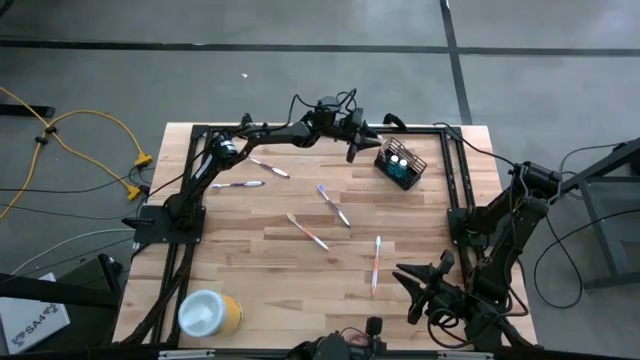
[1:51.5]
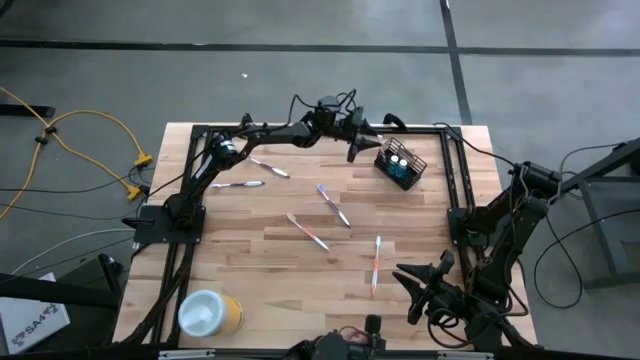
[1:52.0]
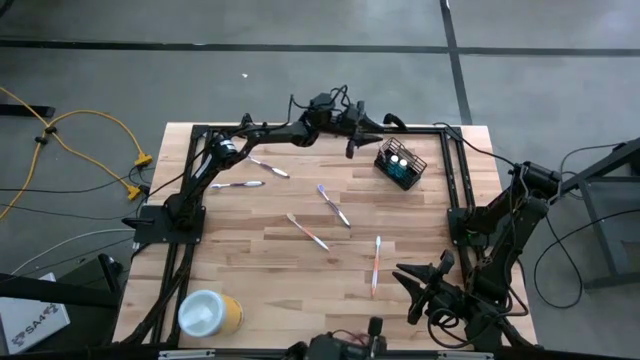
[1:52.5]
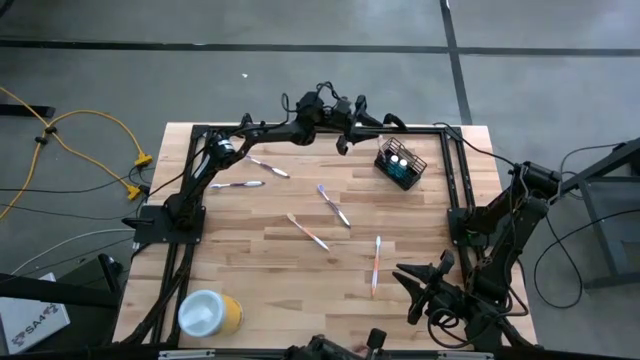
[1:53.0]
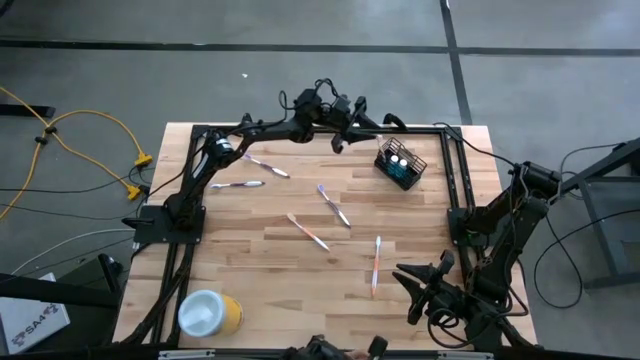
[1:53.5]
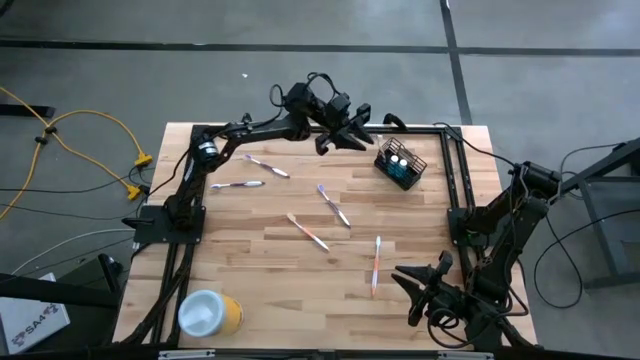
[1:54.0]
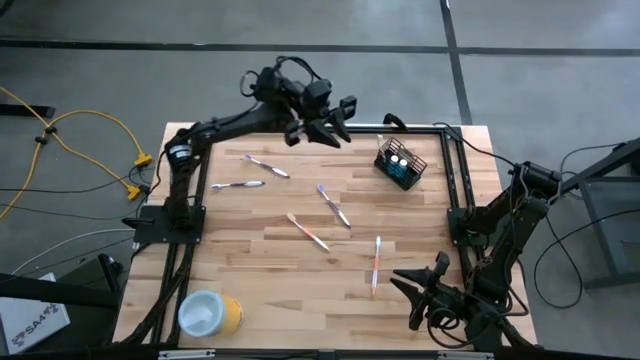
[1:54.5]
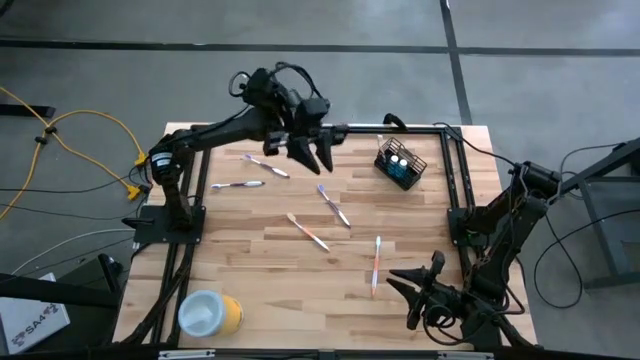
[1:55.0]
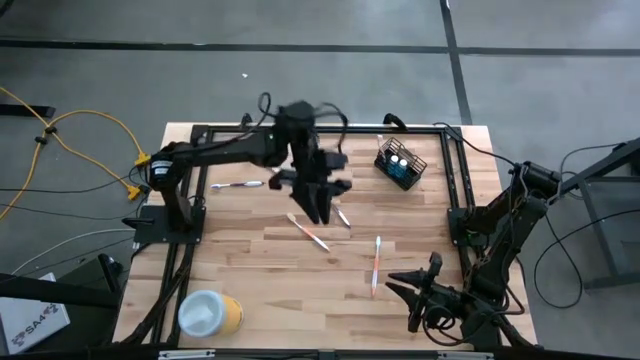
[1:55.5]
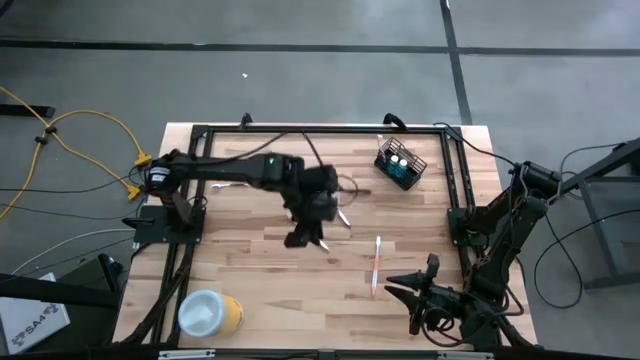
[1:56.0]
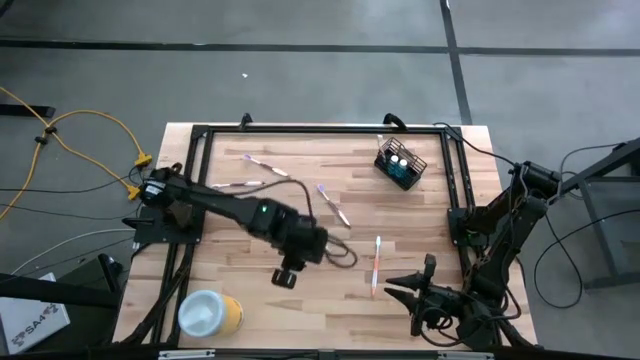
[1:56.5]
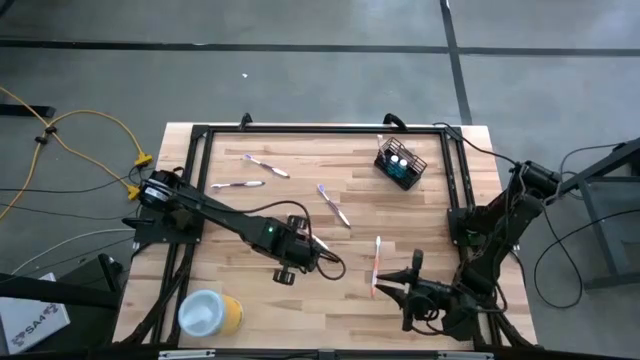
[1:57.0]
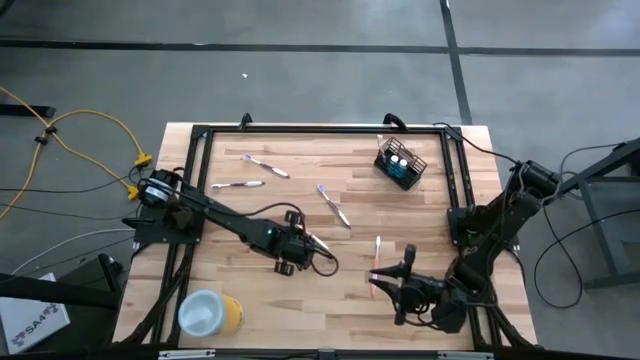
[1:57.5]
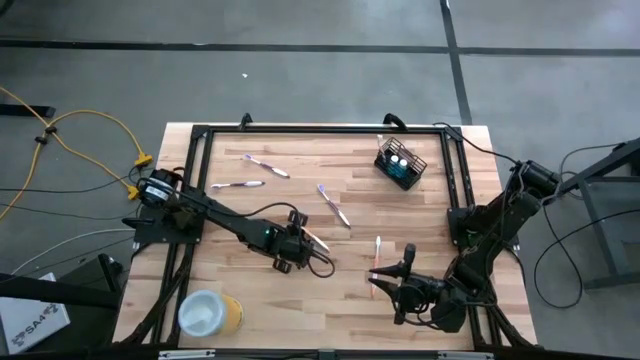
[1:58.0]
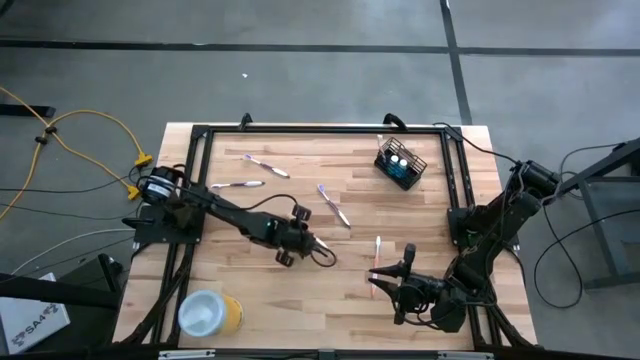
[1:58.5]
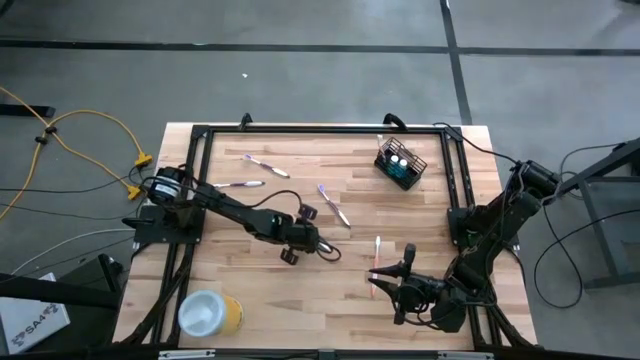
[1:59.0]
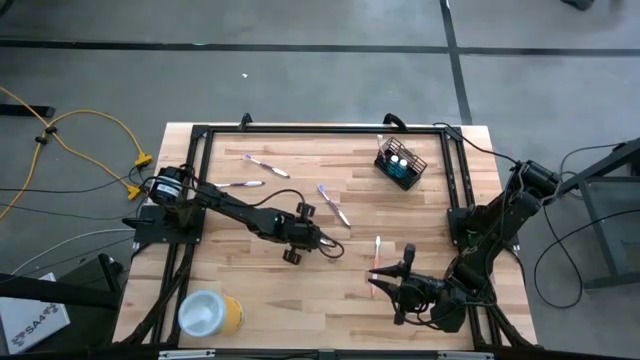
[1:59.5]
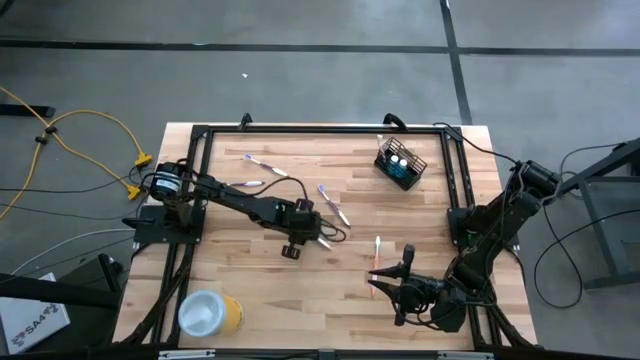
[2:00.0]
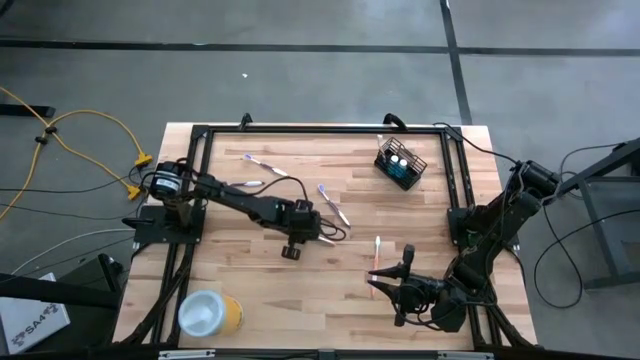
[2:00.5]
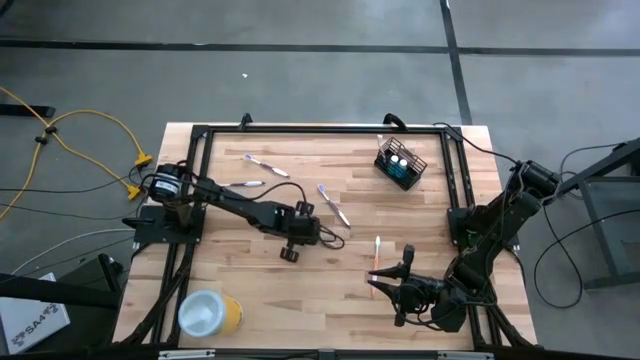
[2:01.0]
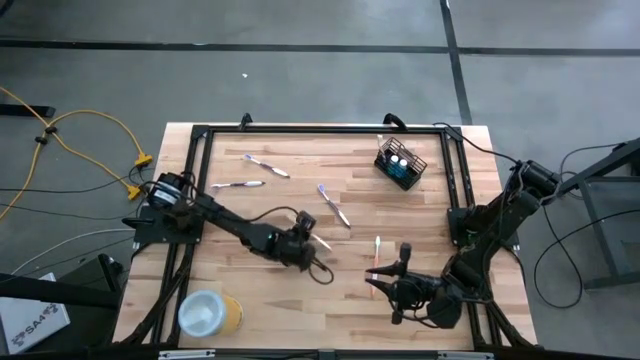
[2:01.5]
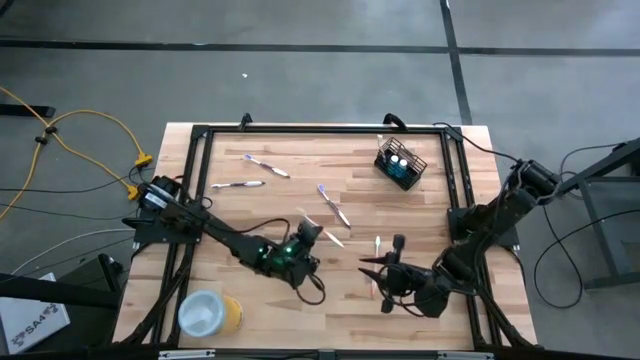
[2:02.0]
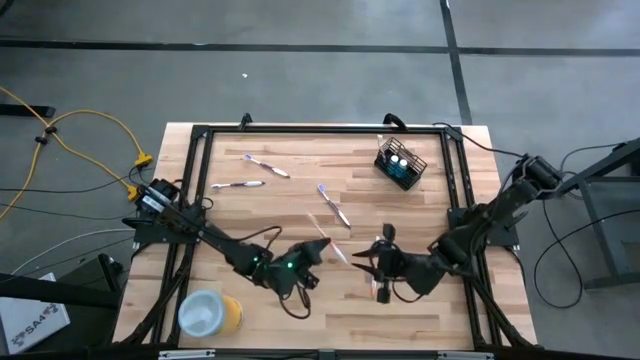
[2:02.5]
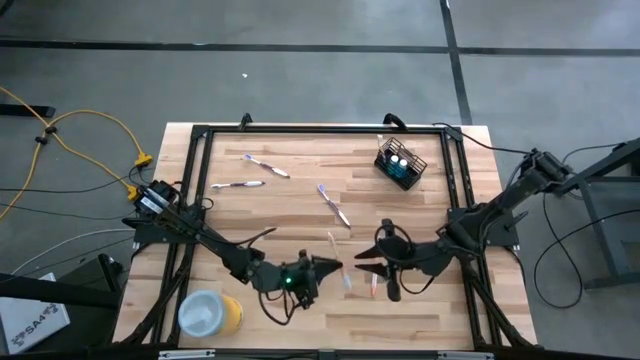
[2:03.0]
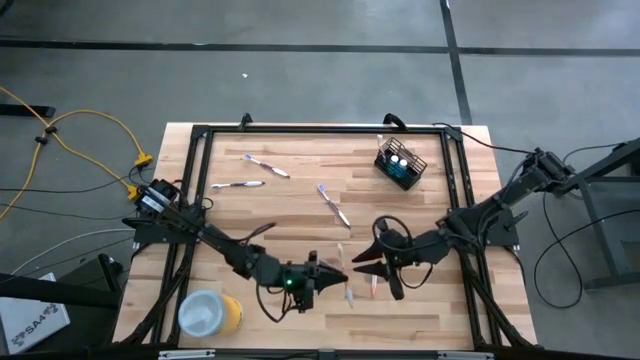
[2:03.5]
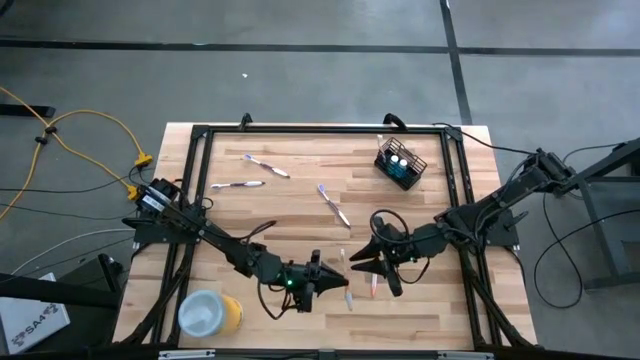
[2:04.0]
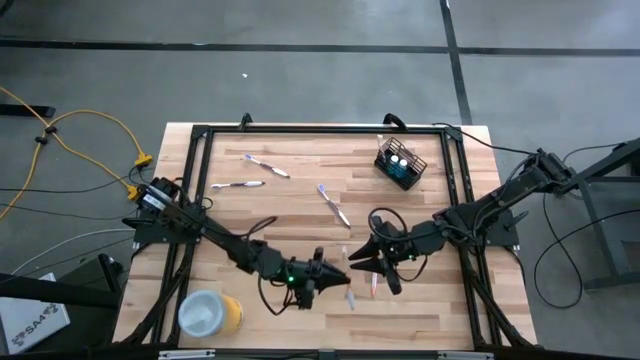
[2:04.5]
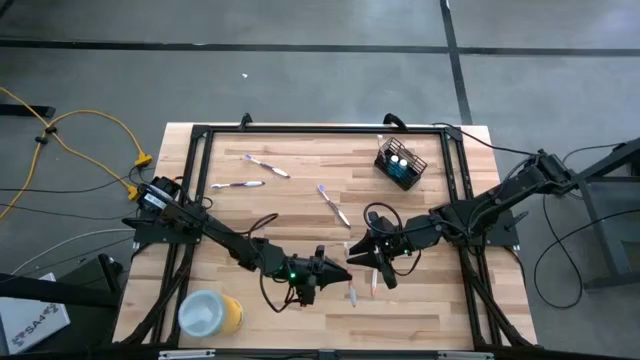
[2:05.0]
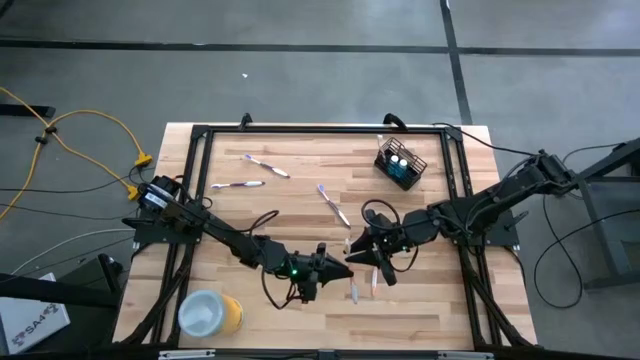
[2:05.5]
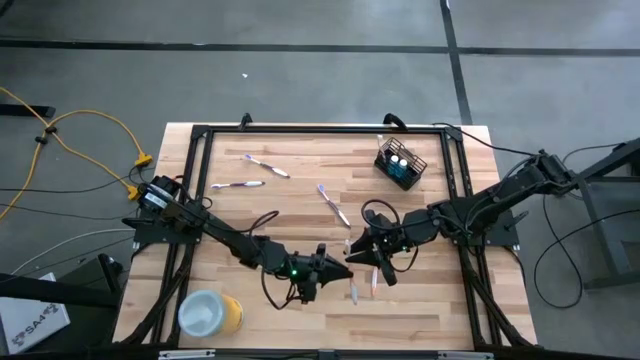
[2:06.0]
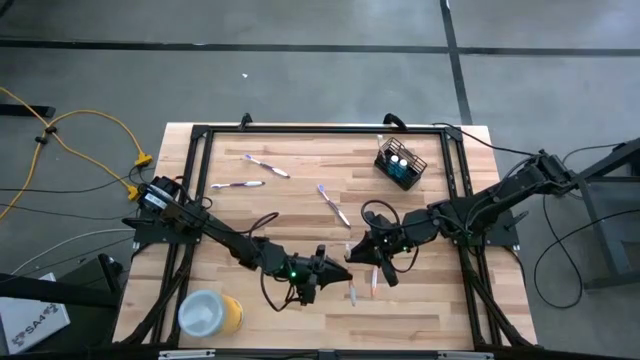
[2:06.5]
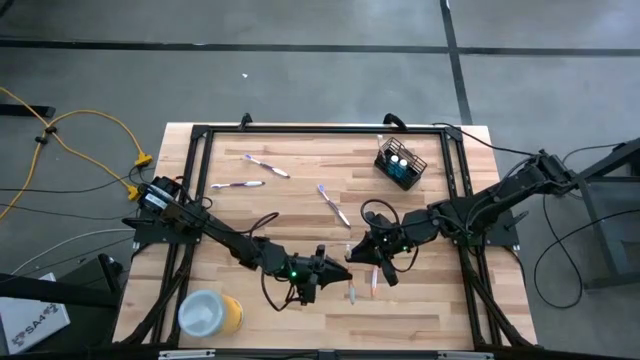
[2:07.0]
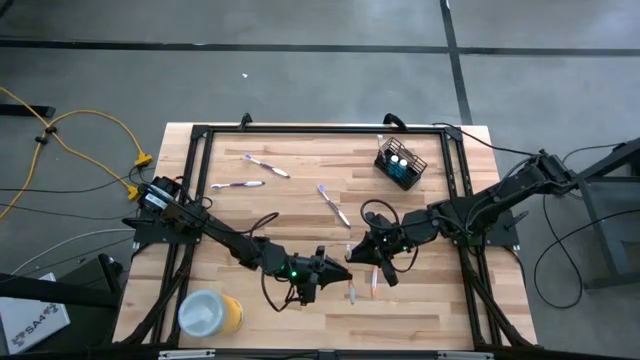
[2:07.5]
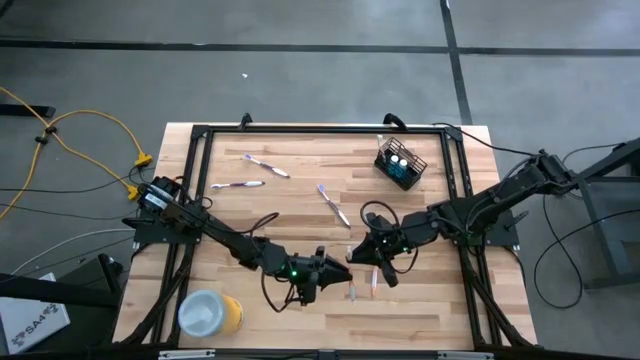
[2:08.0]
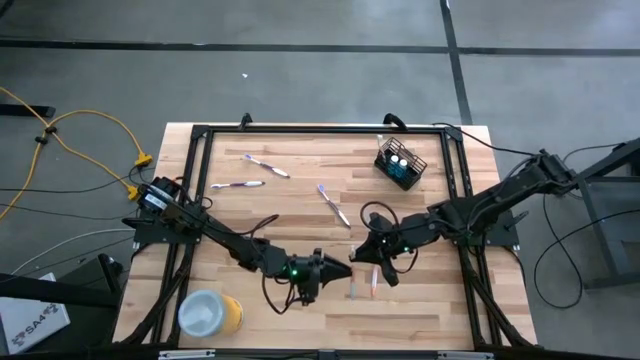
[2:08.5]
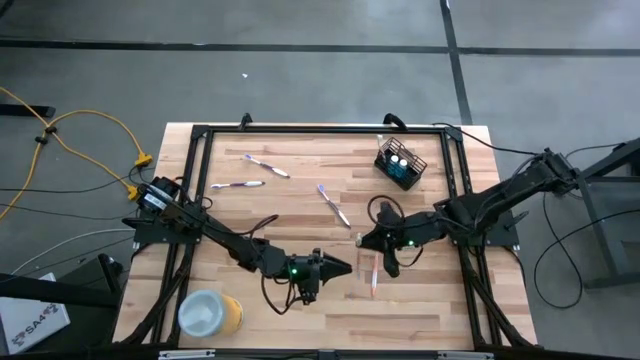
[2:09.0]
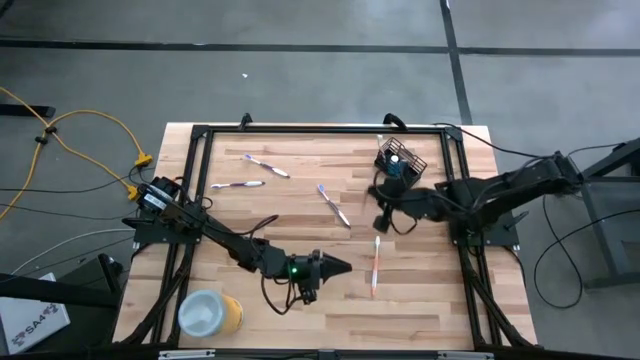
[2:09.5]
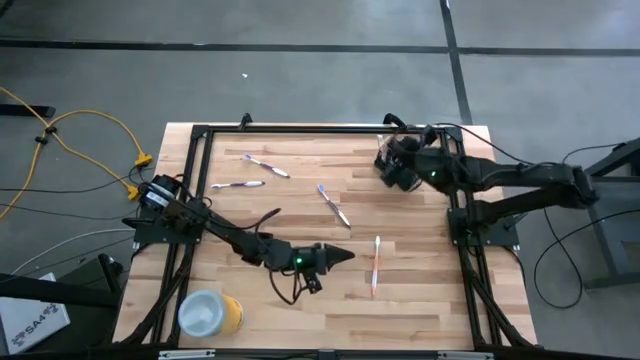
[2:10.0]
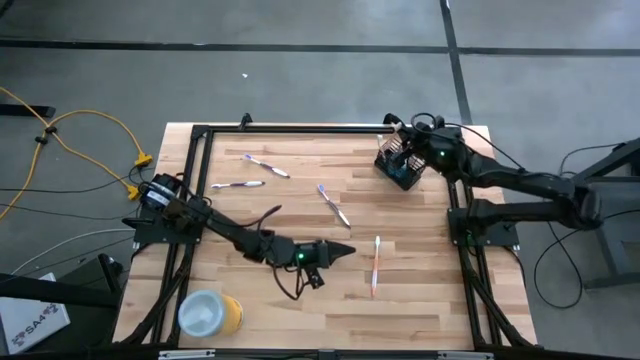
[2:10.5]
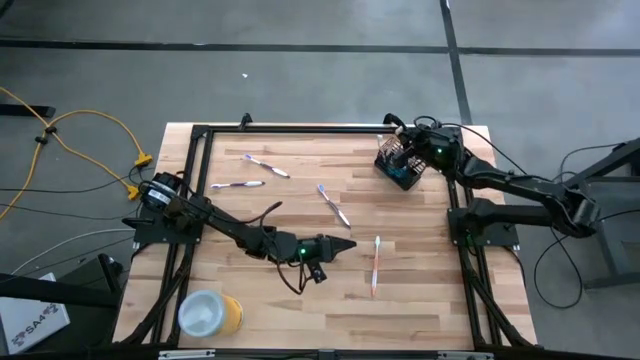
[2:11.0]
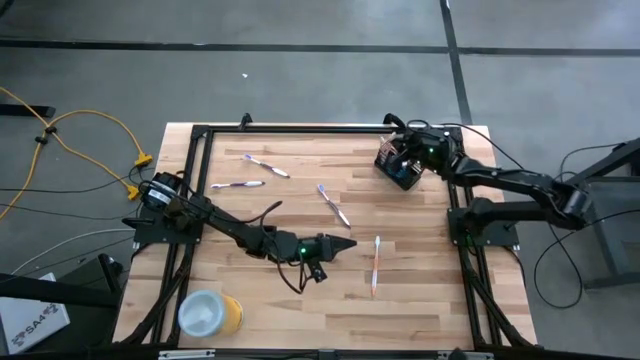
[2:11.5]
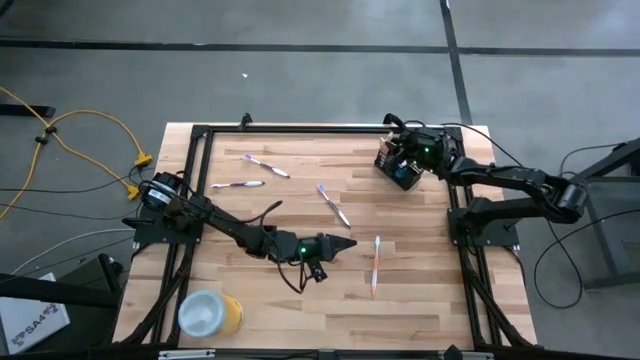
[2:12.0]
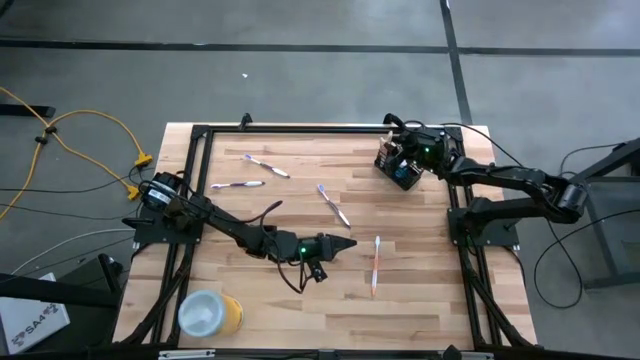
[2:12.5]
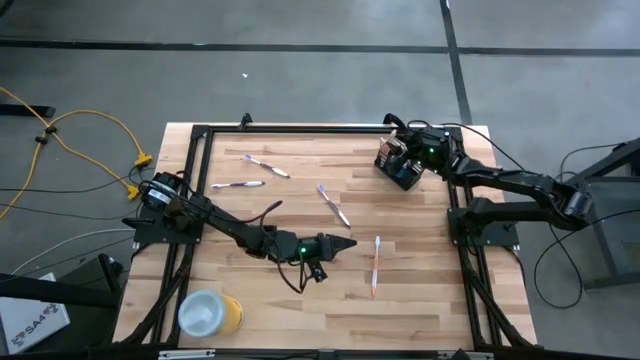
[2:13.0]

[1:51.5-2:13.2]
Task: Pick & Place toothbrushing station
Put the left orange toothbrush into the left of the black mesh organizer
